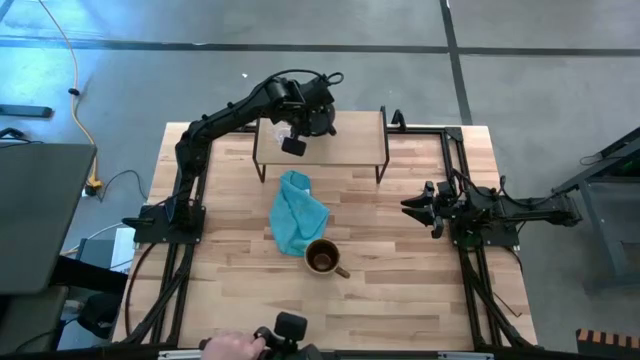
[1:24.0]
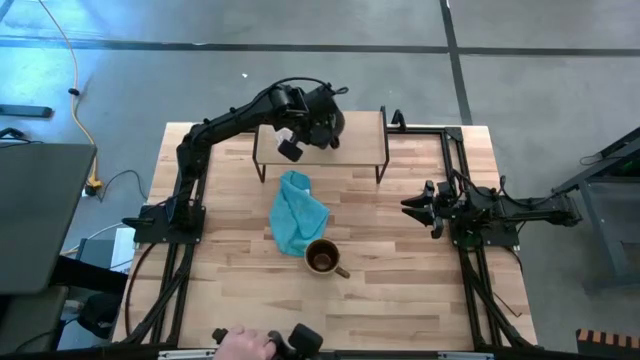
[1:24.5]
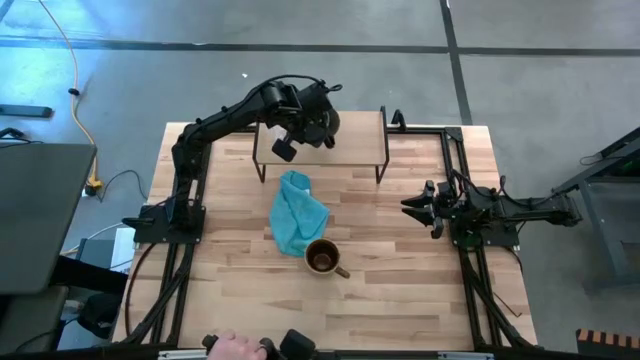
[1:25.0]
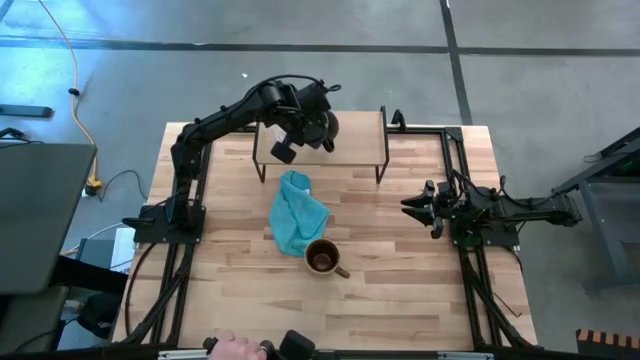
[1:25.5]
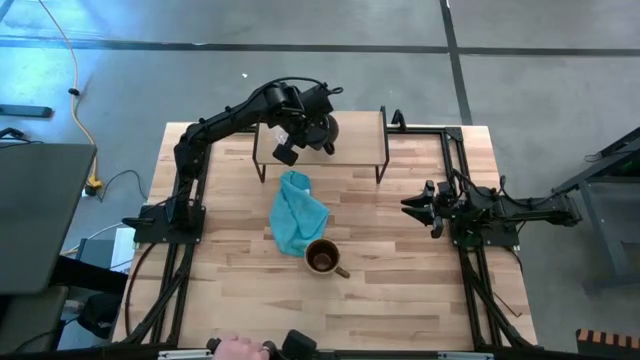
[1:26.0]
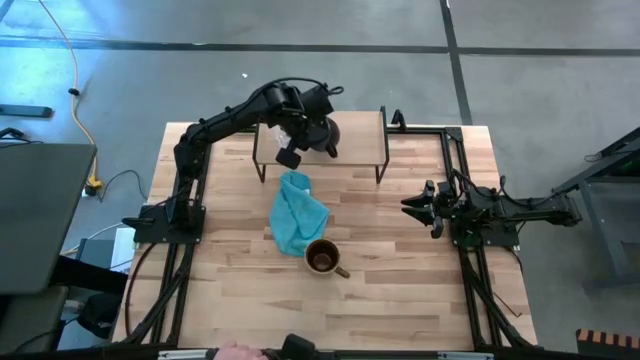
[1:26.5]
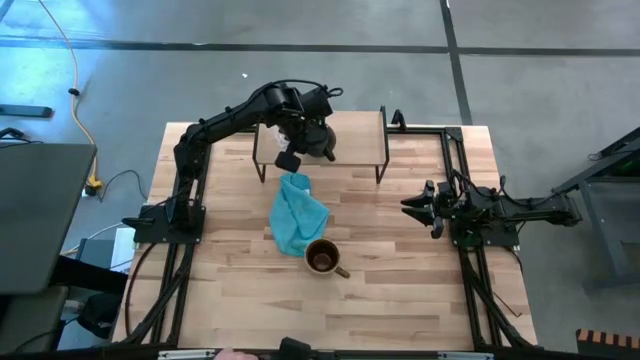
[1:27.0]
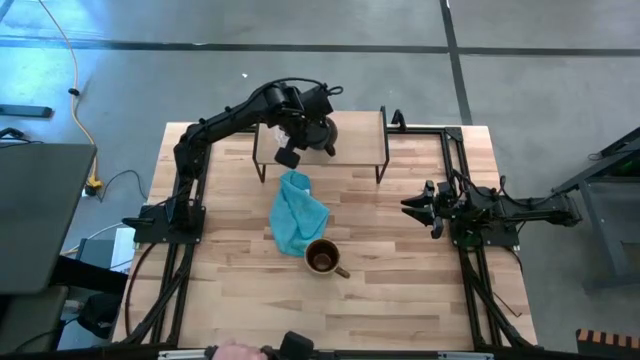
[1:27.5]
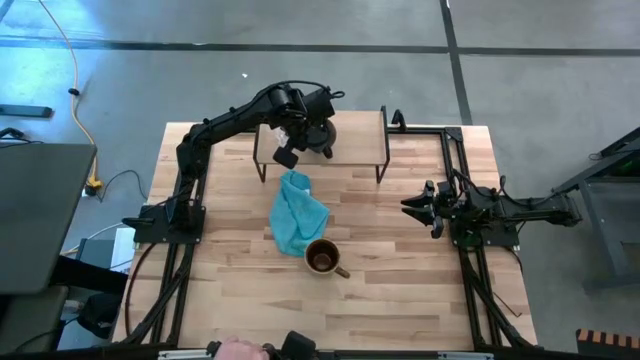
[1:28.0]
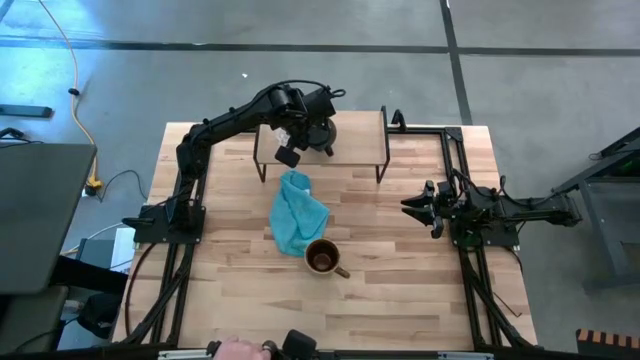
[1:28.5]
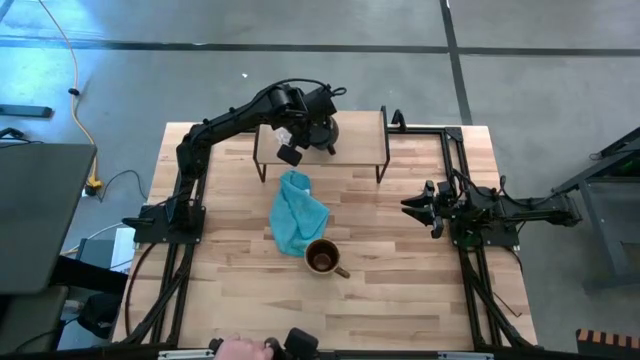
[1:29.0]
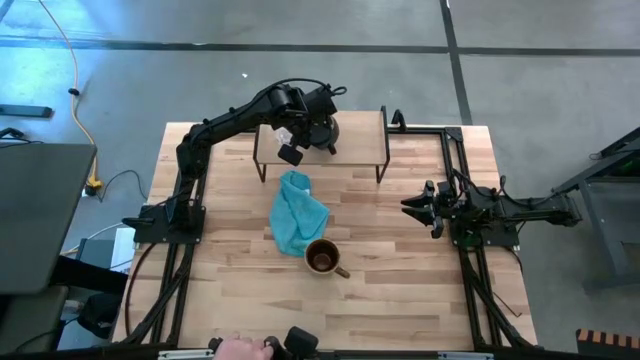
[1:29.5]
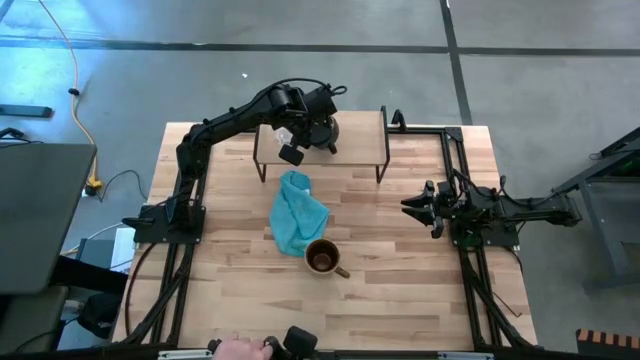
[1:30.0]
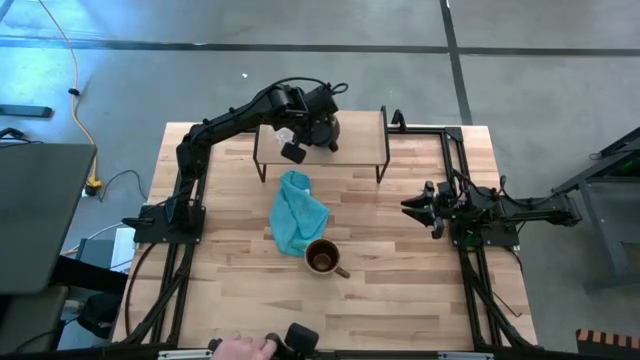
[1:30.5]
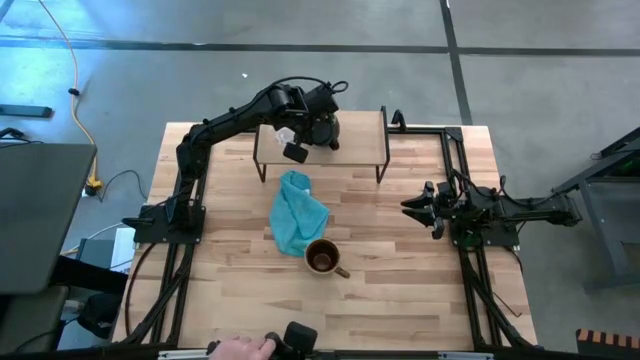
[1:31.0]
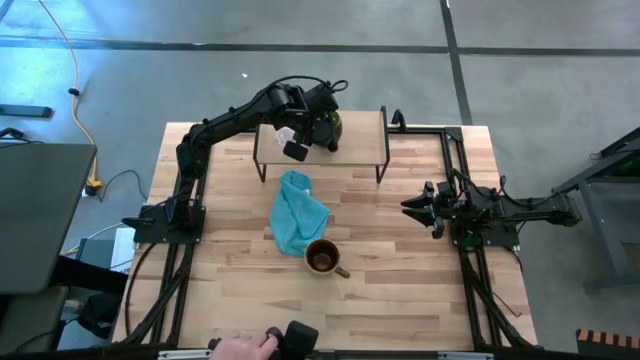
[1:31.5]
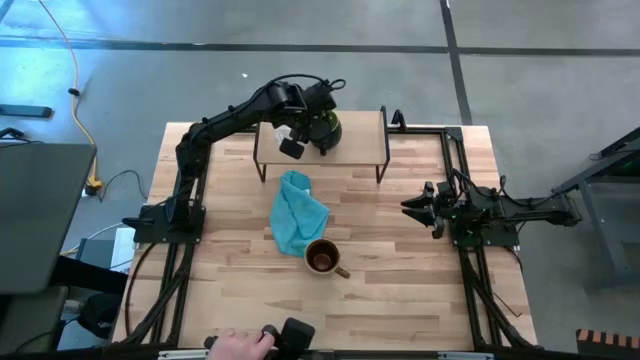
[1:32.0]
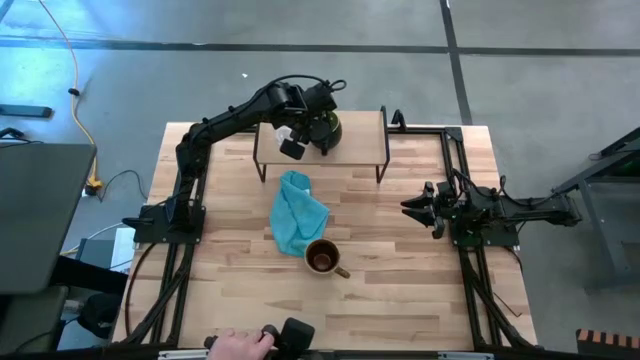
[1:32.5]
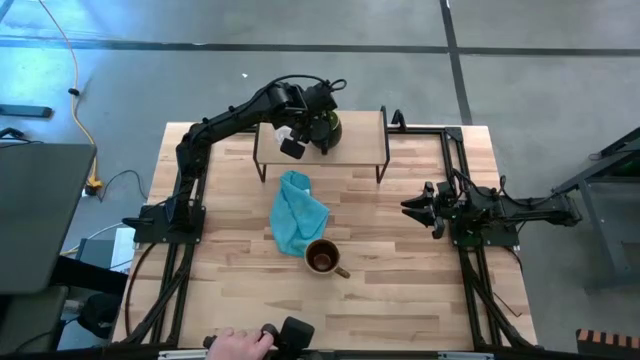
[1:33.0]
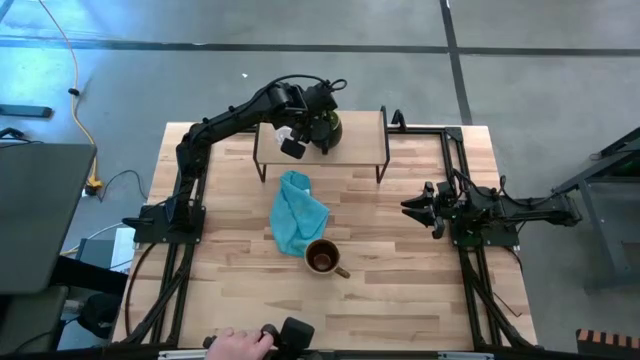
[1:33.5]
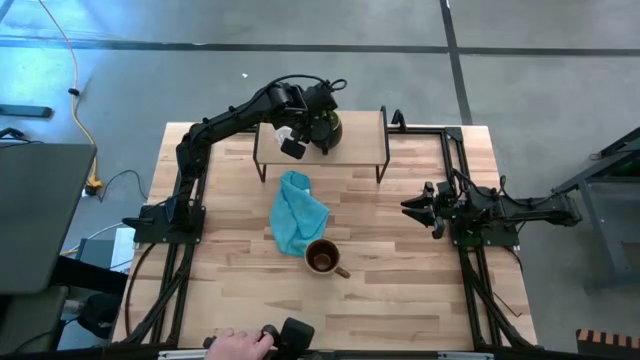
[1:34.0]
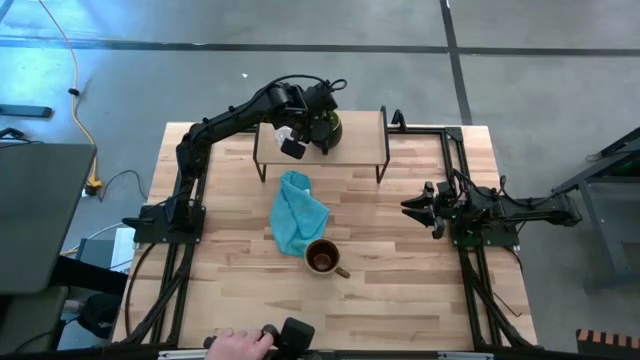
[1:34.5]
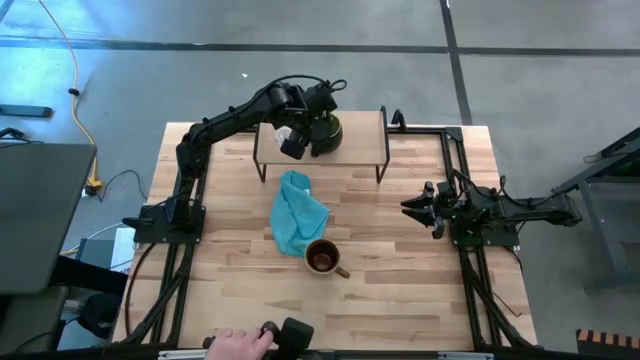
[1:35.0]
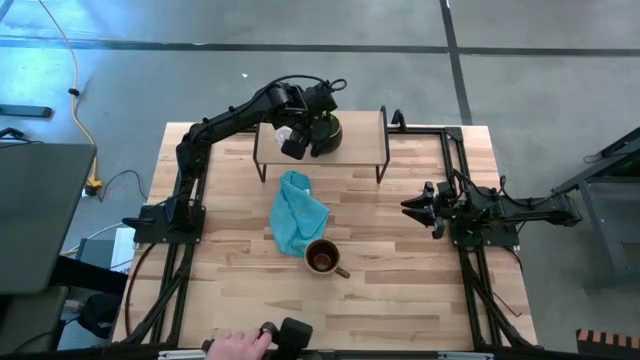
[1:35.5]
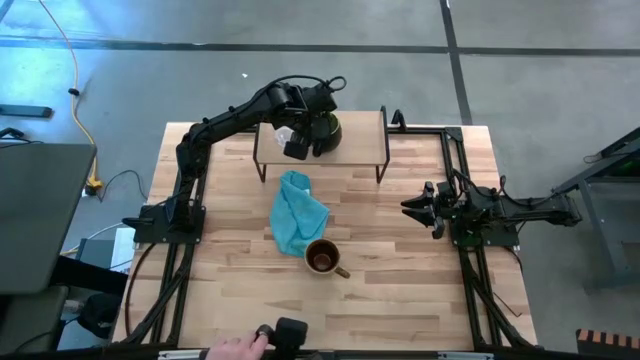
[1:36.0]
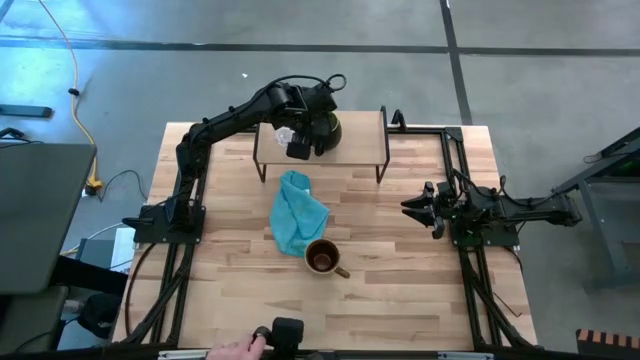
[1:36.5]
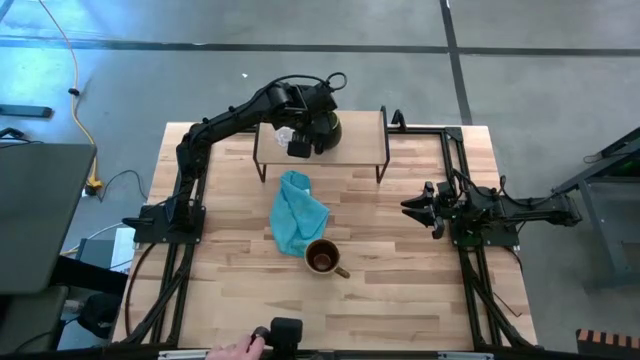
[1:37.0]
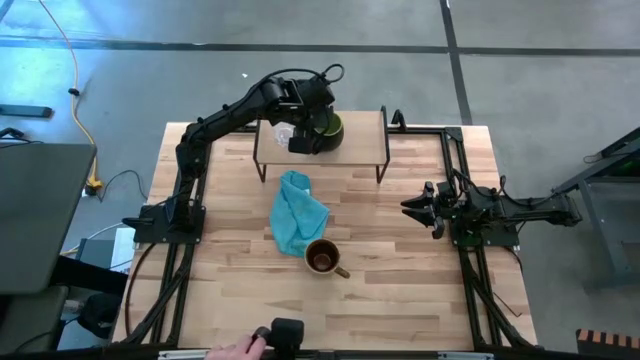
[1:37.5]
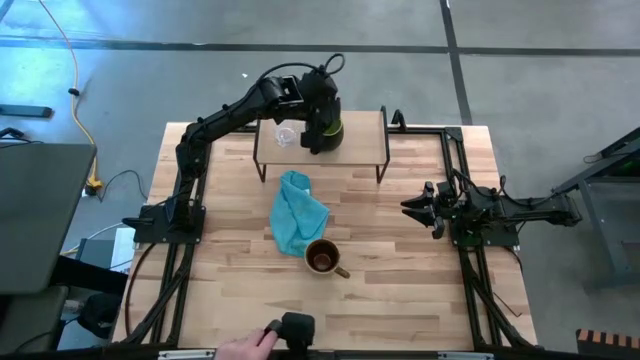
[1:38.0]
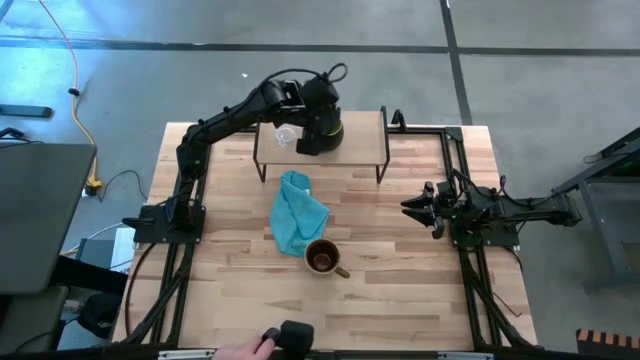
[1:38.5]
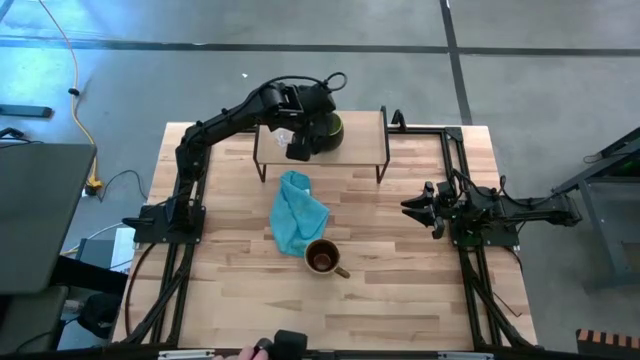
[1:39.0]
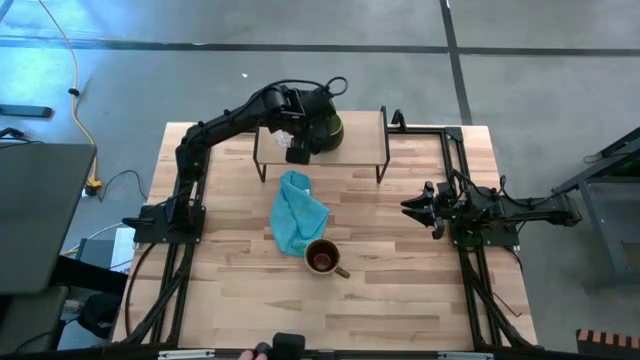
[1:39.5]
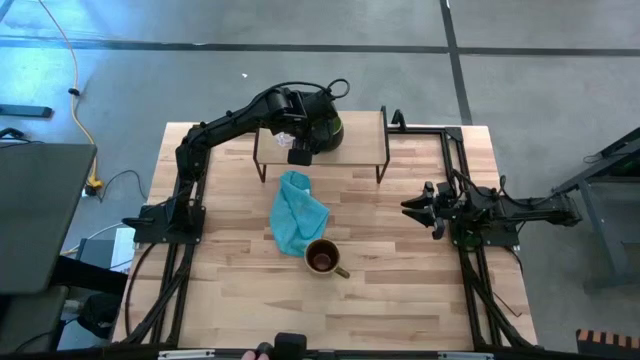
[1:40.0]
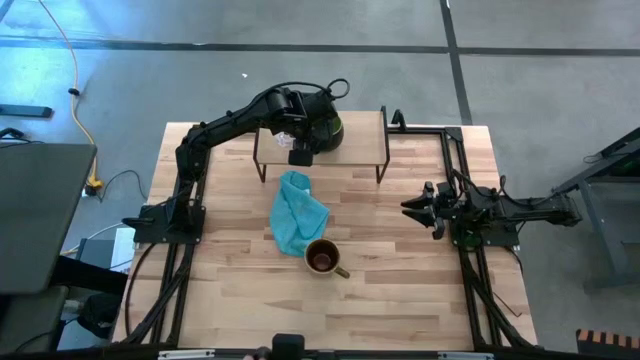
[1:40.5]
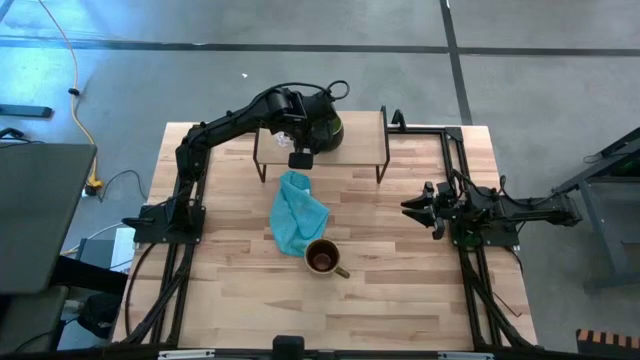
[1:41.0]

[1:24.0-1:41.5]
Task: Stack small to large cups/mugs on shelf
Put the green mug on the shelf

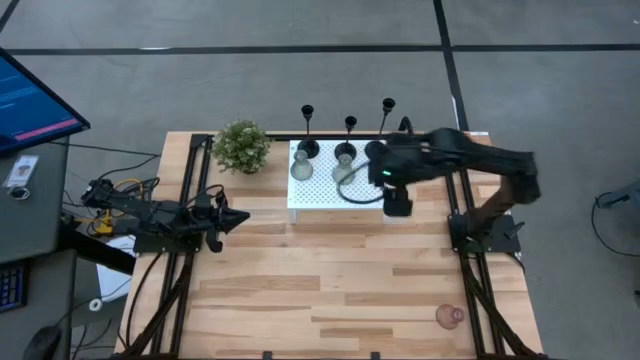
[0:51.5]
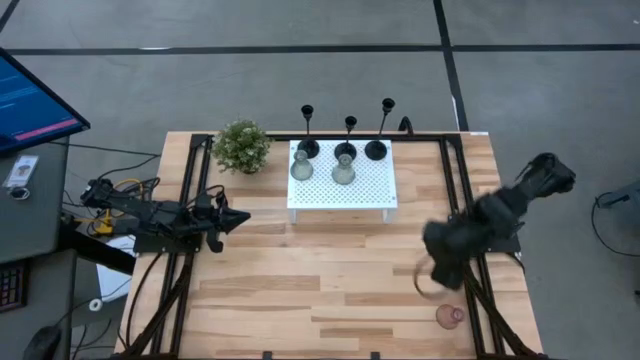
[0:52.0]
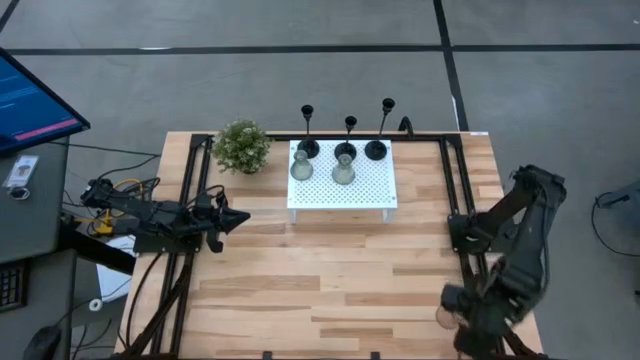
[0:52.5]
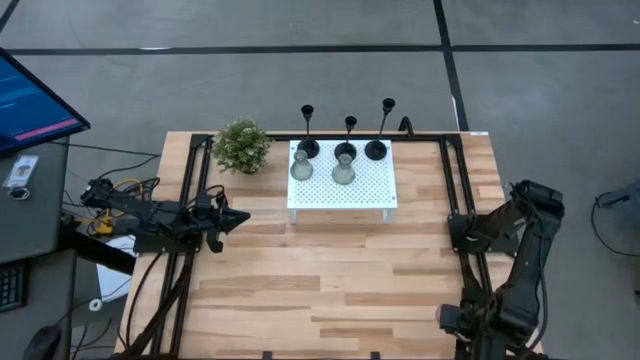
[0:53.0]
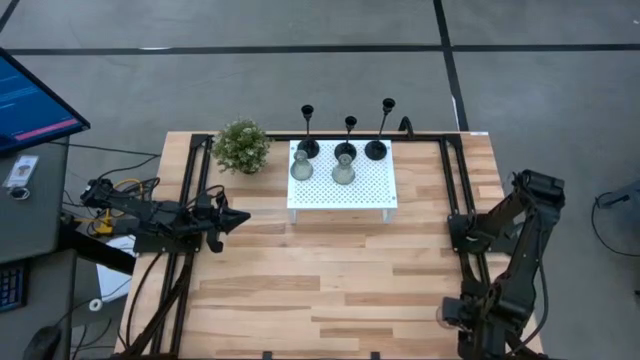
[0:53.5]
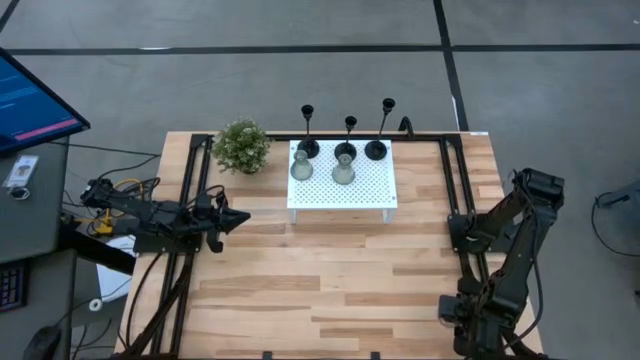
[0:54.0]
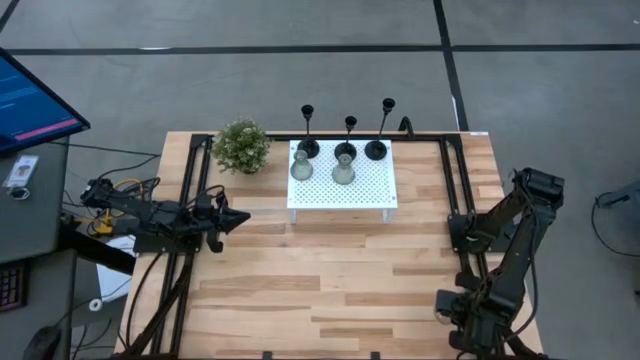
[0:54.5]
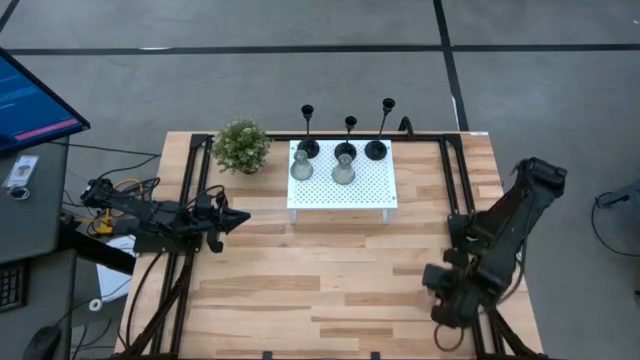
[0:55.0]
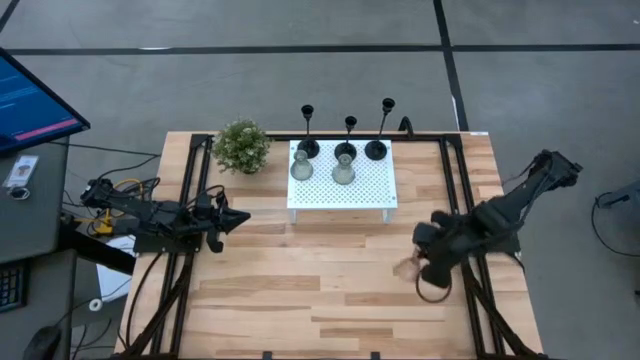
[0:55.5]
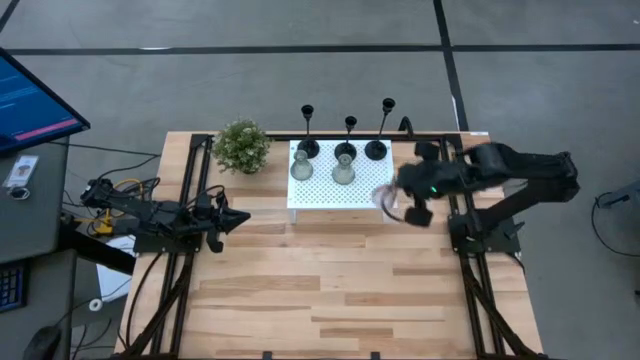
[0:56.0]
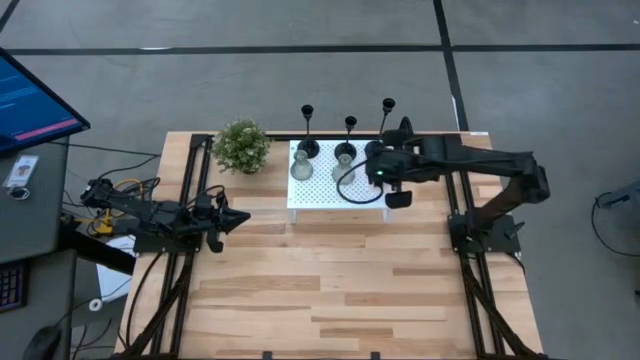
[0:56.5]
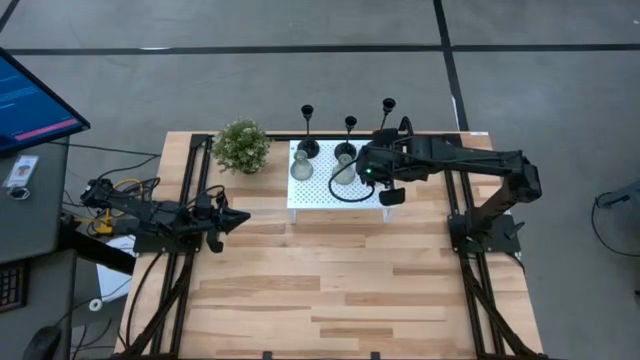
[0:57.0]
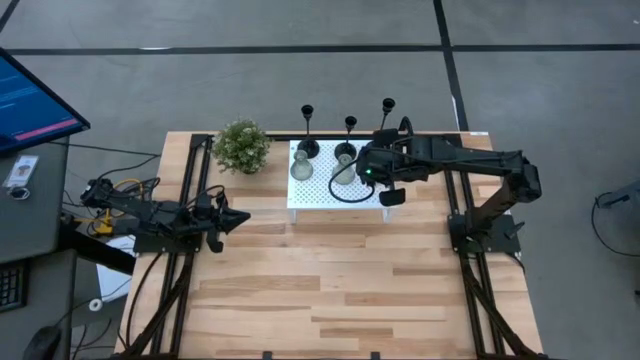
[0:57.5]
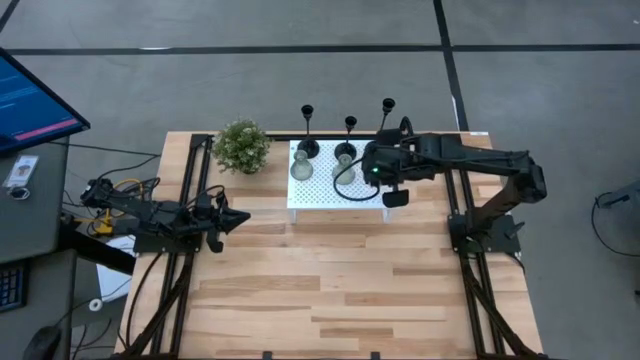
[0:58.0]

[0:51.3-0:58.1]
Task: Pick & Place candle stick holders
Put the violet candle holder on the shelf aligned with the black candle holder
